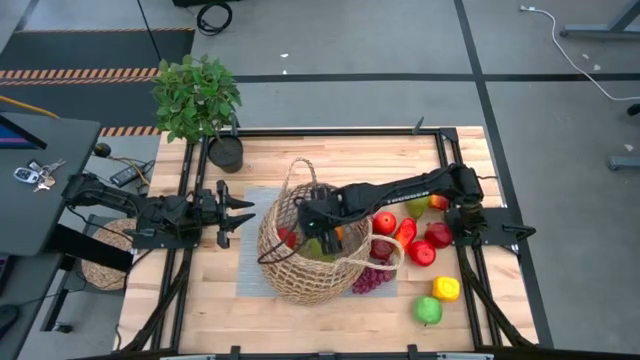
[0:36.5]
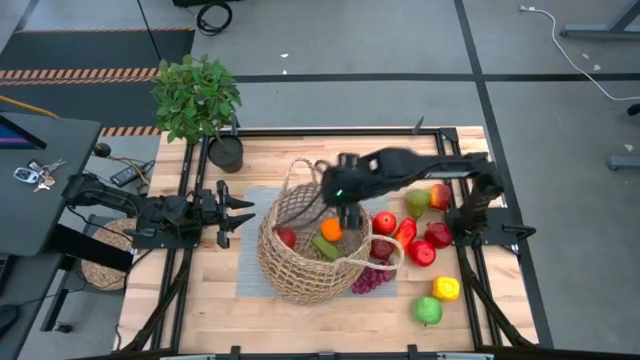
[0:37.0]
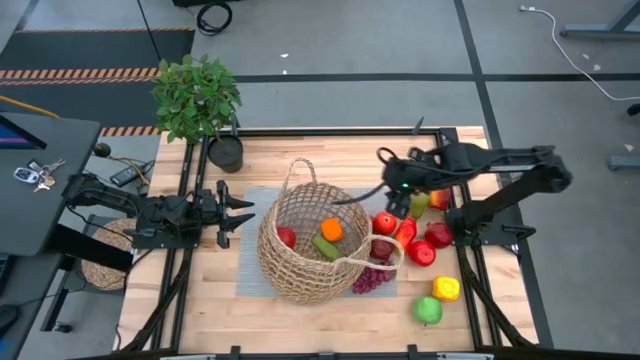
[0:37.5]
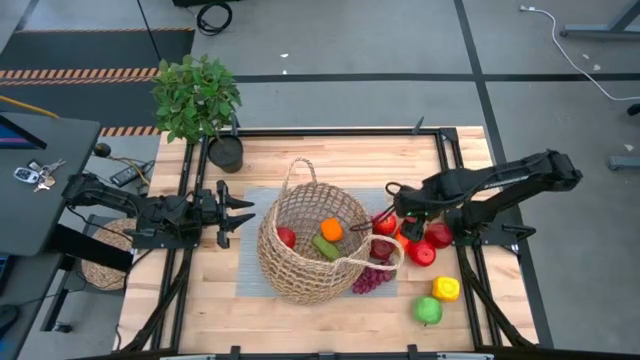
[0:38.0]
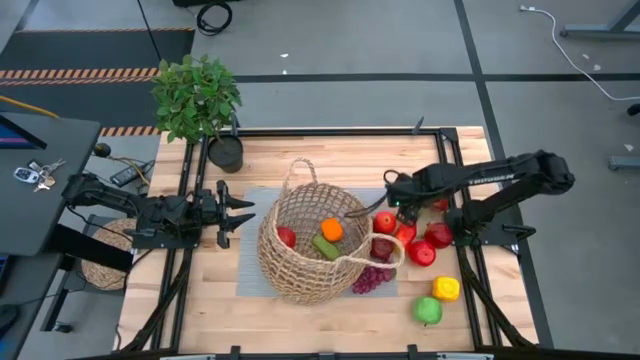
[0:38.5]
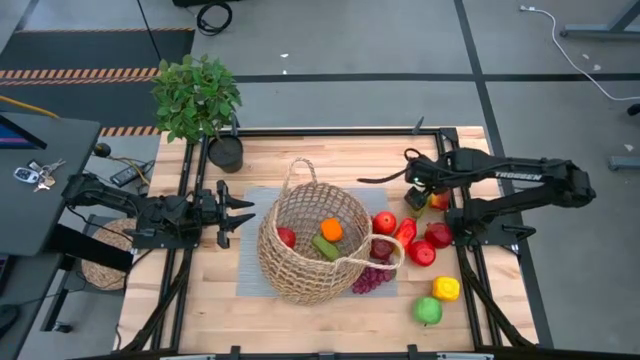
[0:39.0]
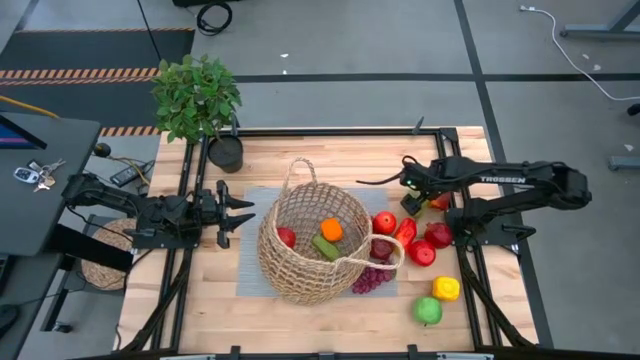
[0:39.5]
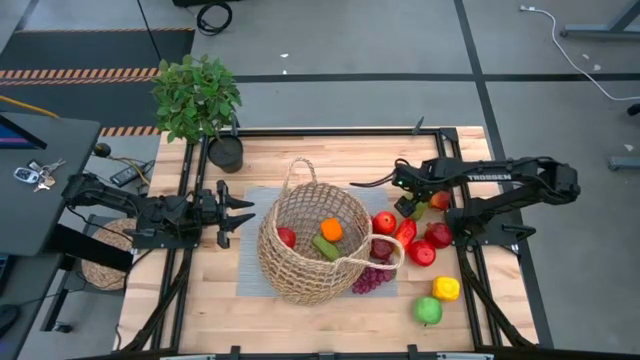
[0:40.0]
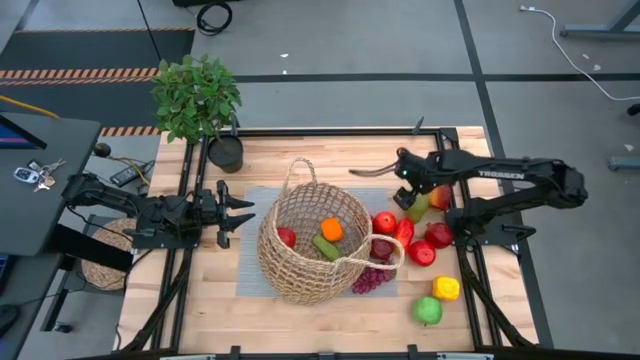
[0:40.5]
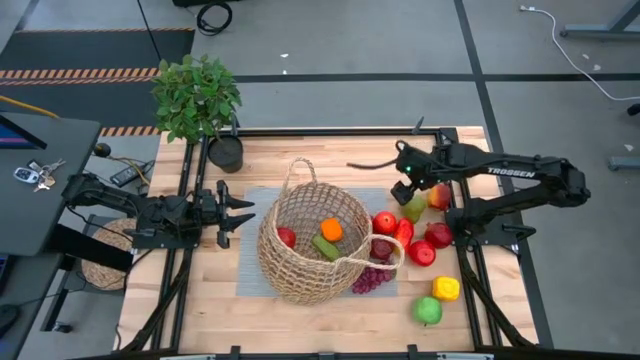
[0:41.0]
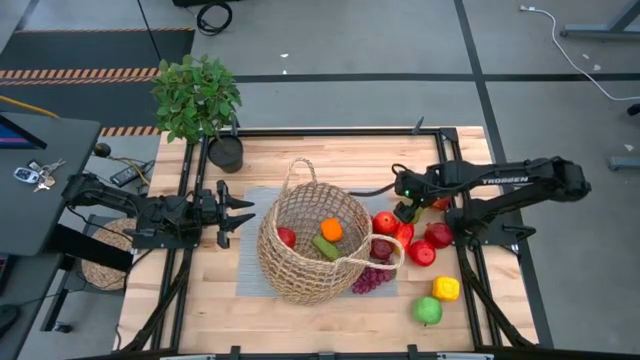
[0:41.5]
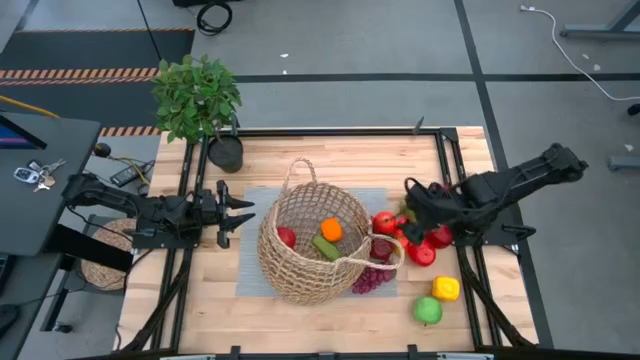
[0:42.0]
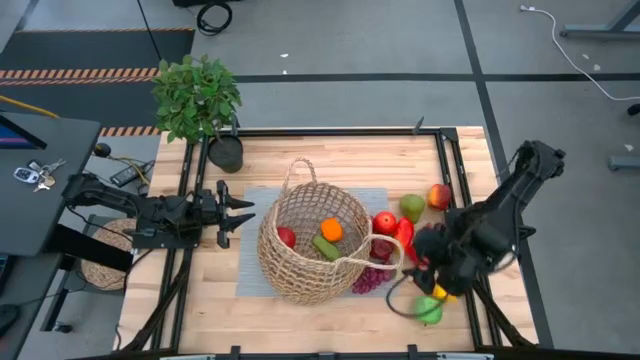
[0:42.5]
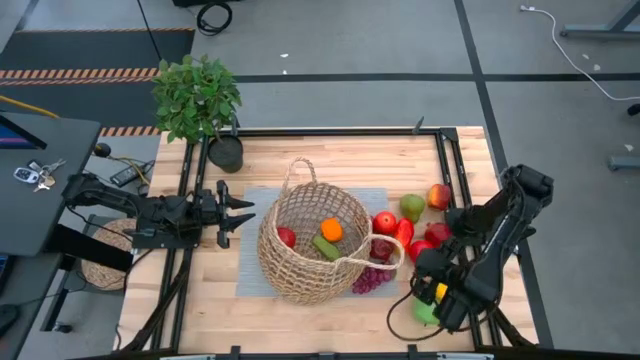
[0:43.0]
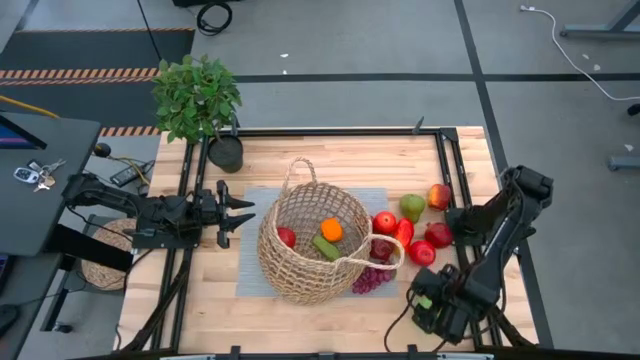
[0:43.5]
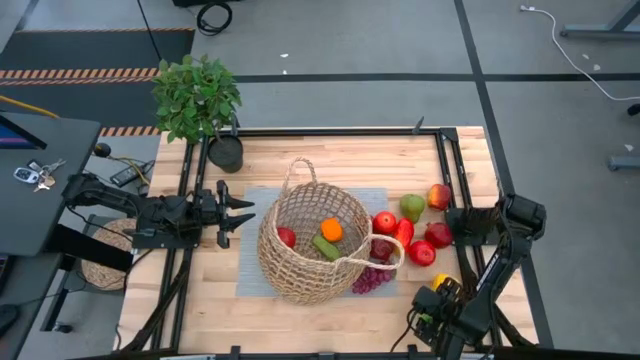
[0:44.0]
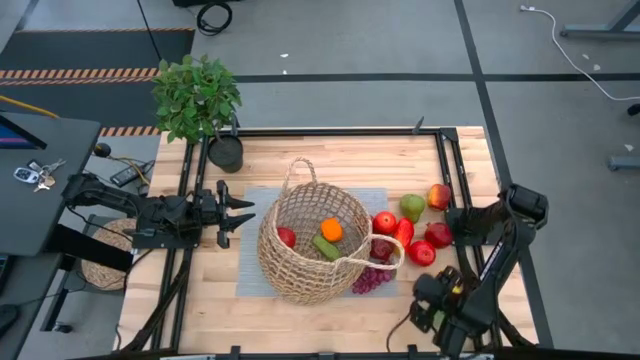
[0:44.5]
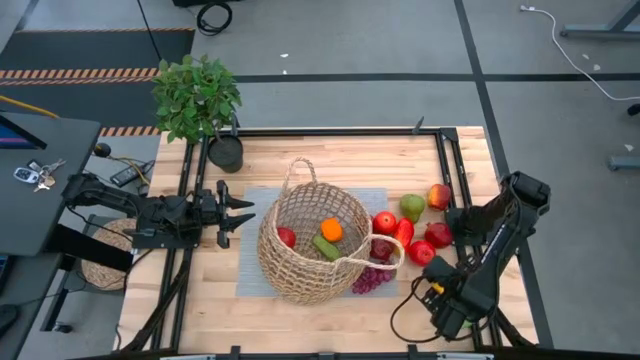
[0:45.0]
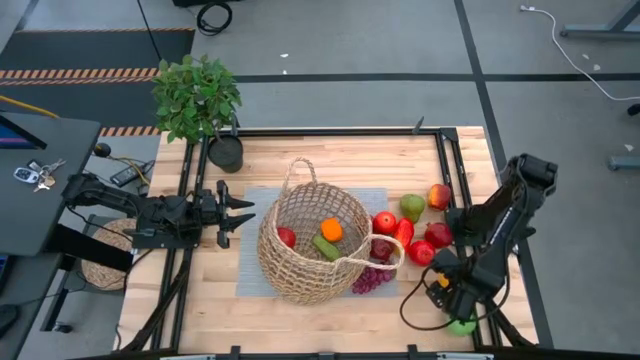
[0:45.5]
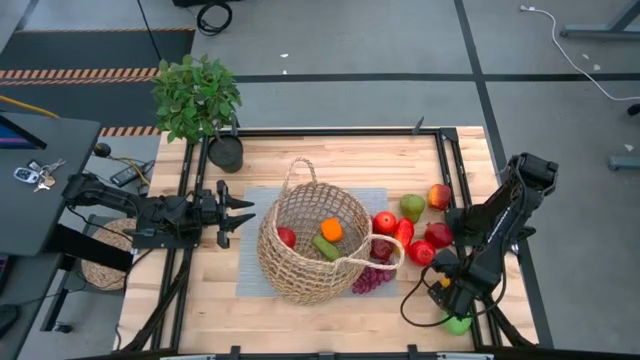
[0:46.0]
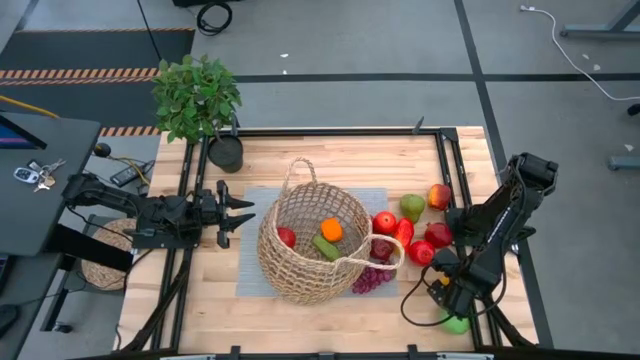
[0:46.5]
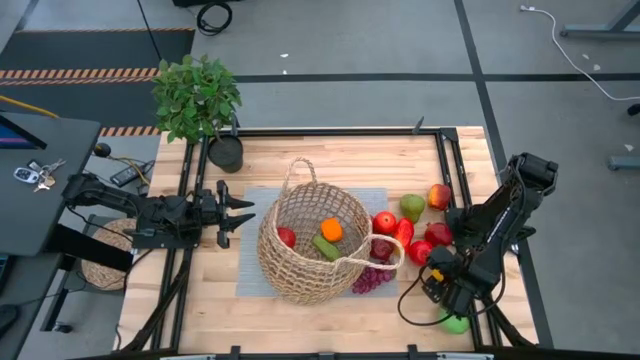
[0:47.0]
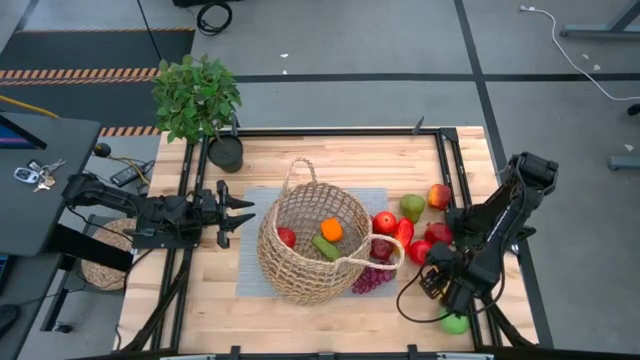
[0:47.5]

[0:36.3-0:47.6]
Task: Build produce basket
Put the bell pepper into the basket

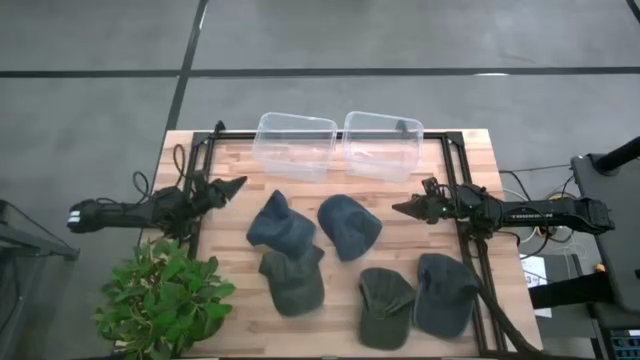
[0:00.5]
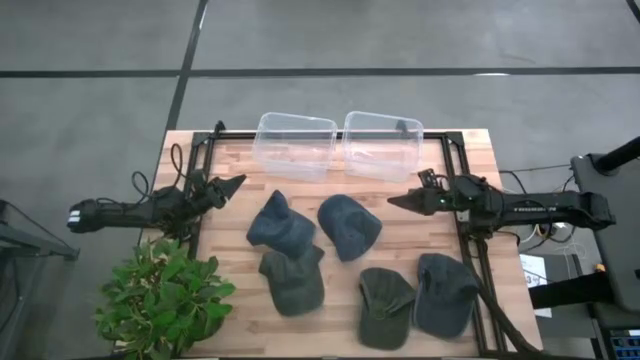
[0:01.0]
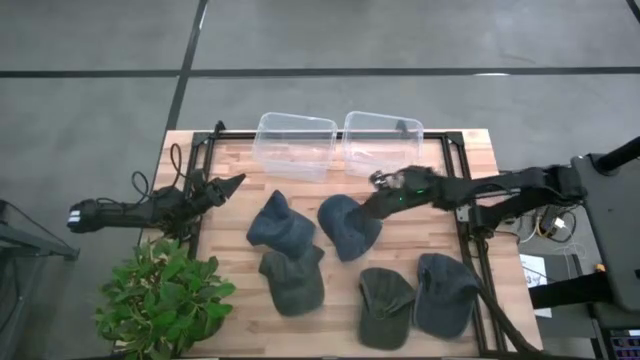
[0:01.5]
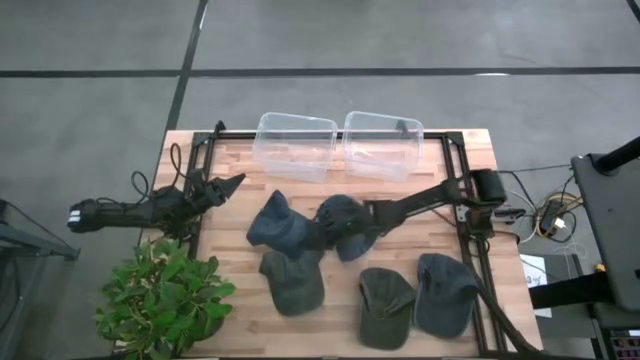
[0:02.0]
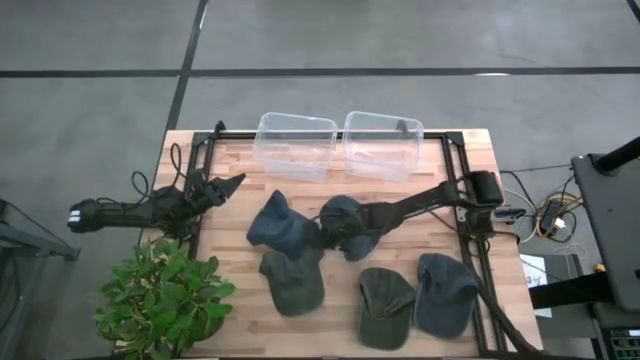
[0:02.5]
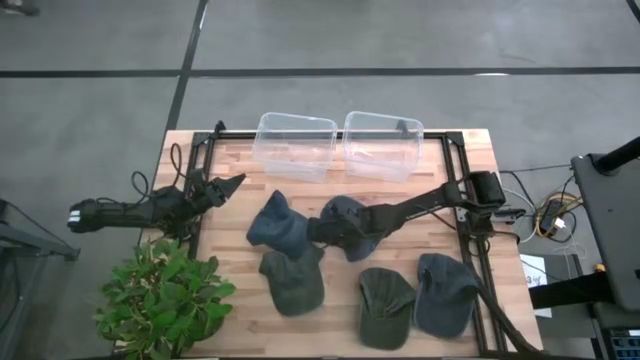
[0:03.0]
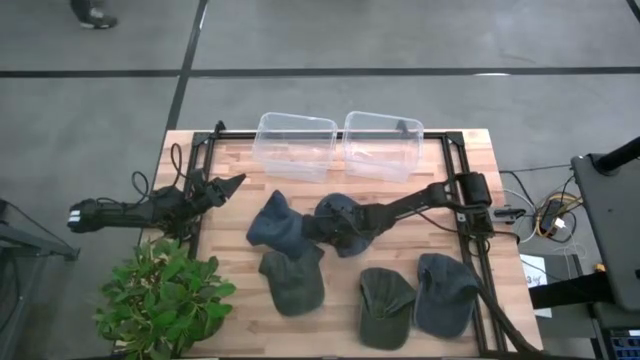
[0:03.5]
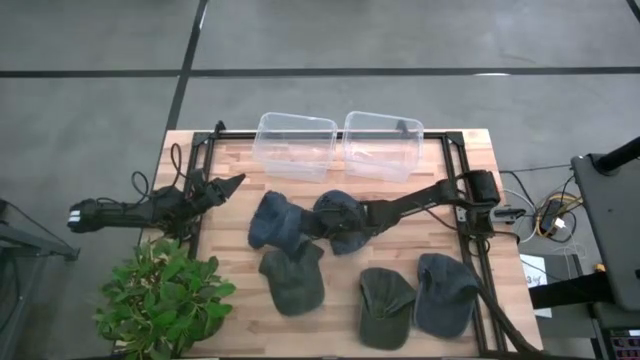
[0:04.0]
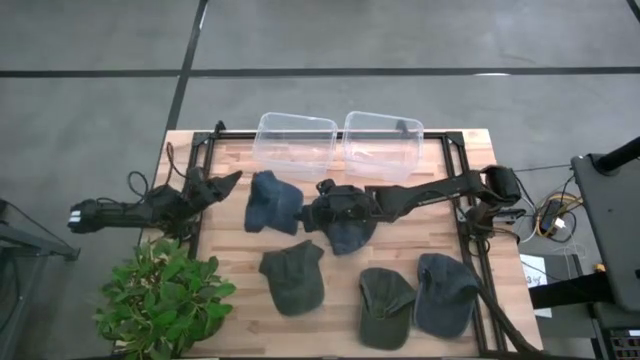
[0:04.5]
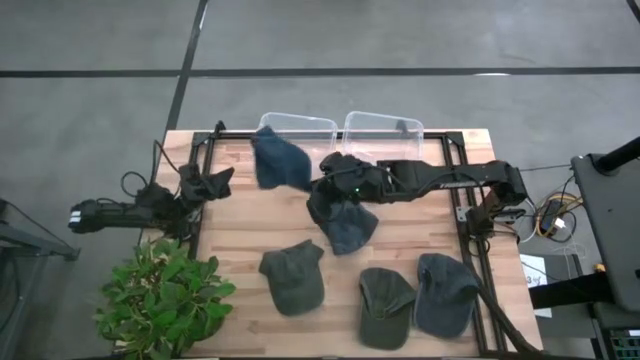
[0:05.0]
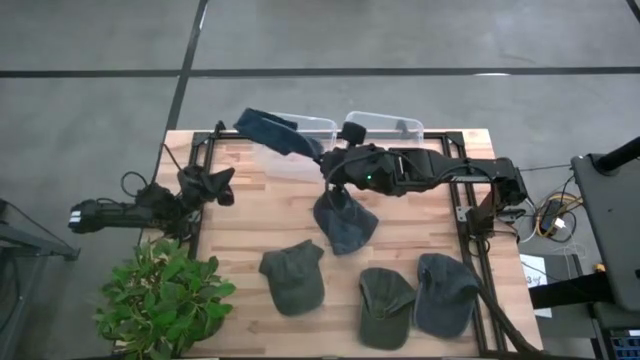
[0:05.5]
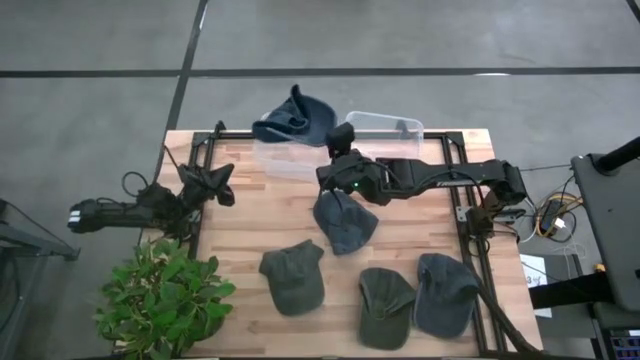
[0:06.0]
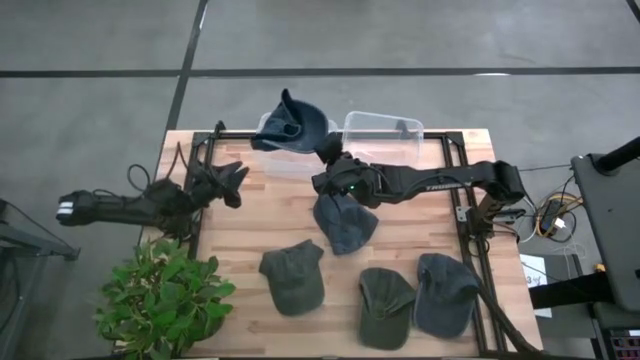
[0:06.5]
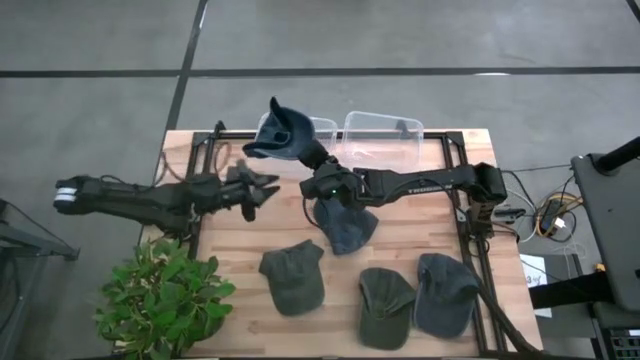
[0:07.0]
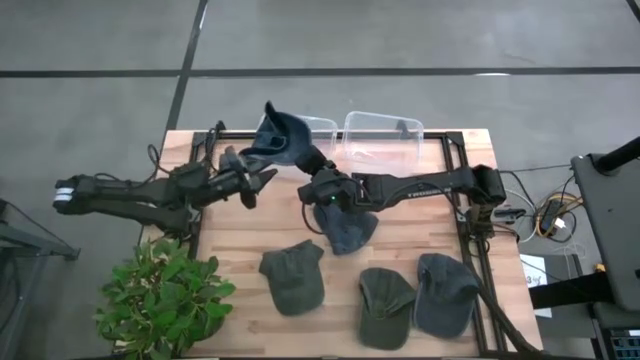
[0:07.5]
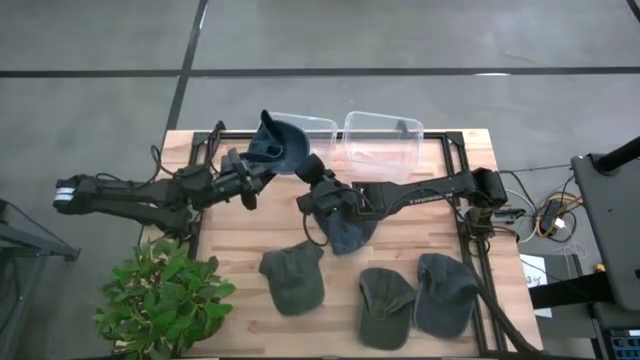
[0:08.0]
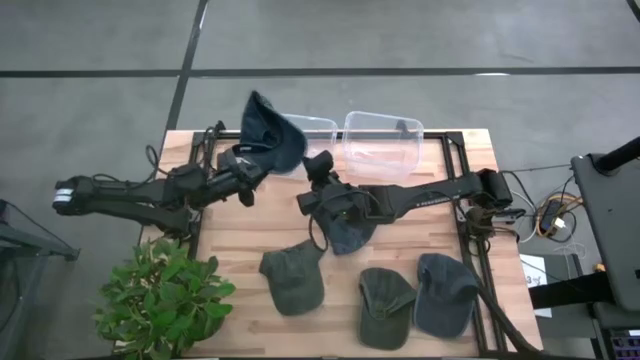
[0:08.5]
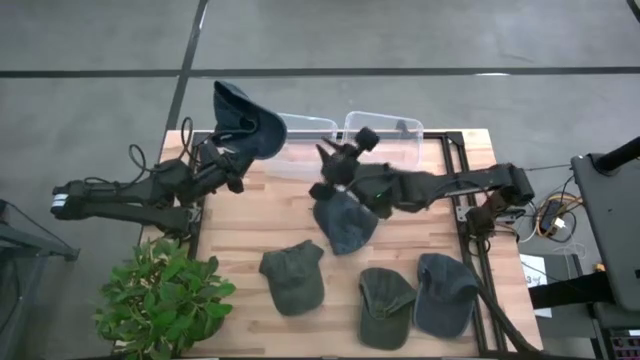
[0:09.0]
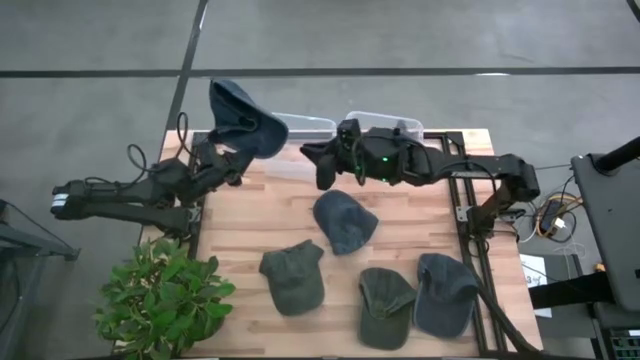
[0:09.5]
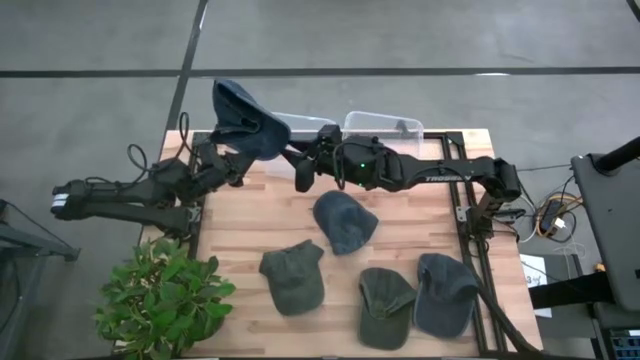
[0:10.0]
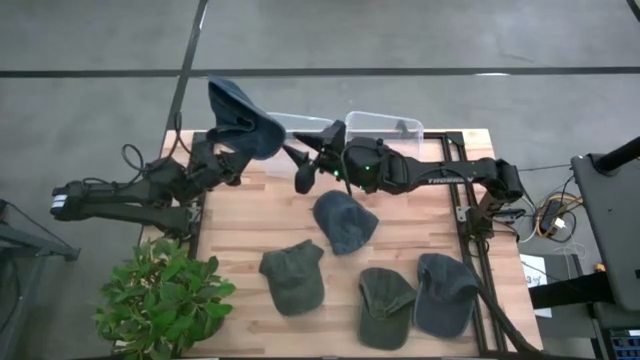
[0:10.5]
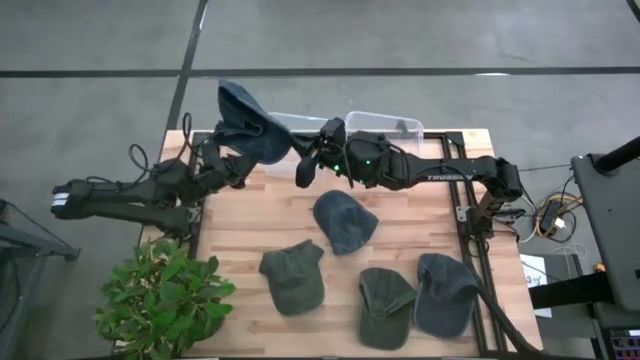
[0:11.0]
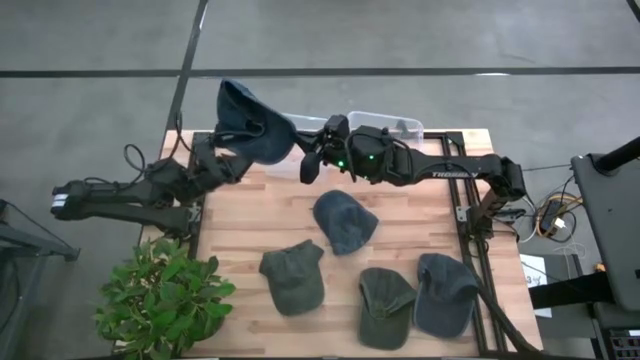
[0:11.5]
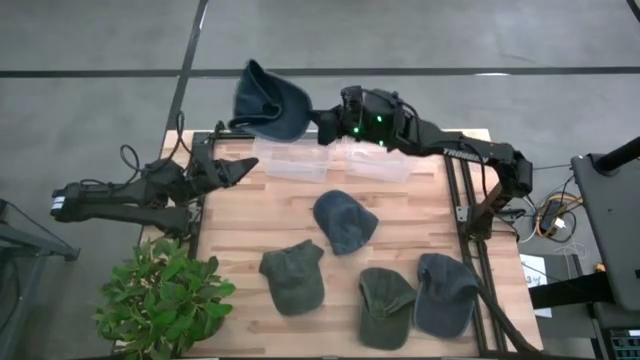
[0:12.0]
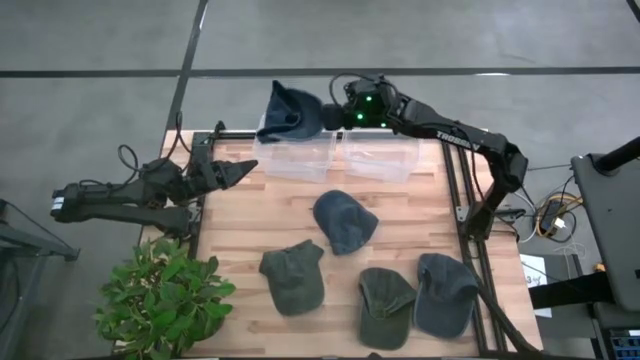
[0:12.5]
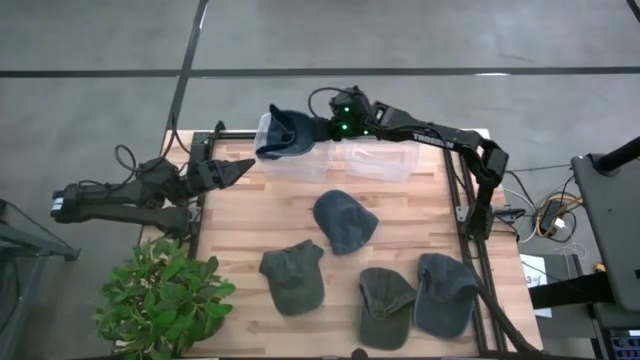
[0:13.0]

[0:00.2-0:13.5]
Task: Pick & Place hat
Put the top left blue cap into the left transparent bin
